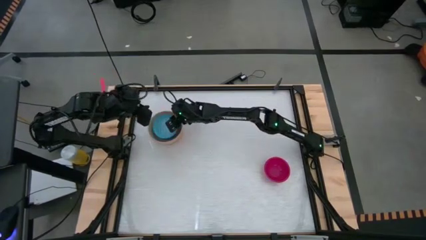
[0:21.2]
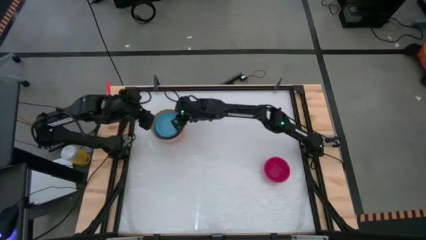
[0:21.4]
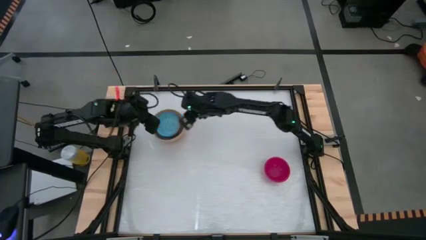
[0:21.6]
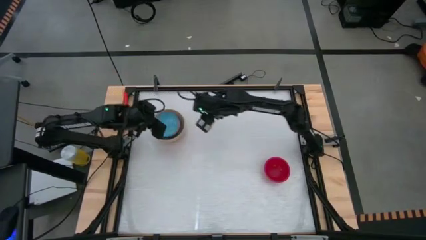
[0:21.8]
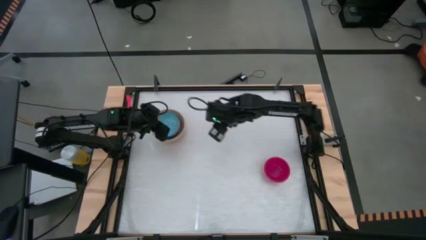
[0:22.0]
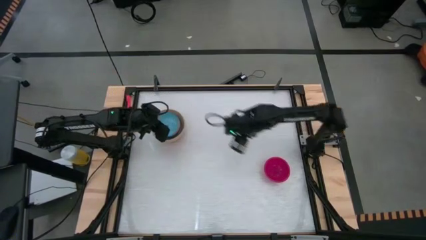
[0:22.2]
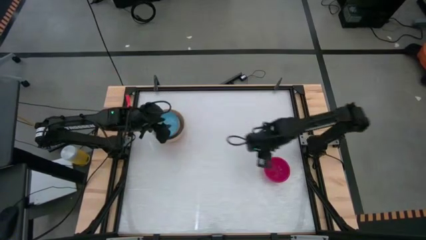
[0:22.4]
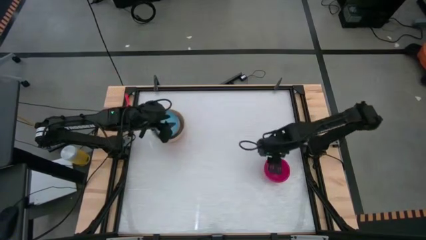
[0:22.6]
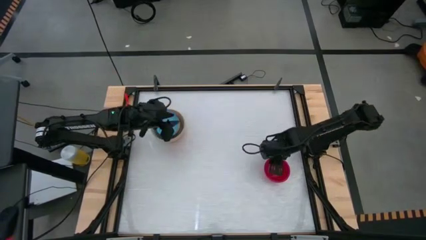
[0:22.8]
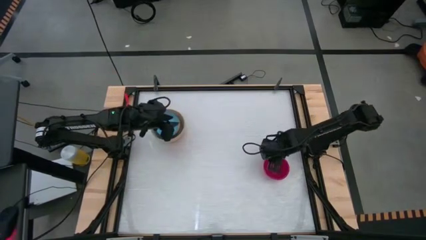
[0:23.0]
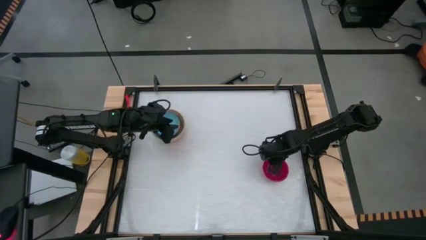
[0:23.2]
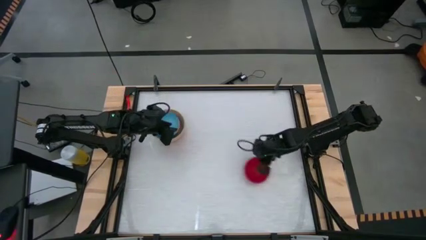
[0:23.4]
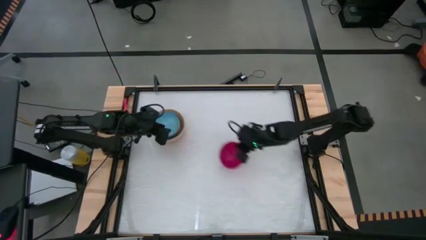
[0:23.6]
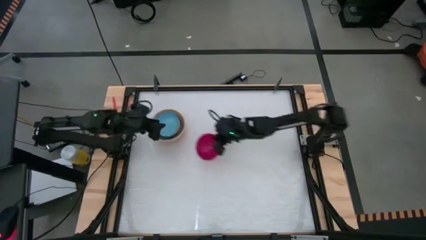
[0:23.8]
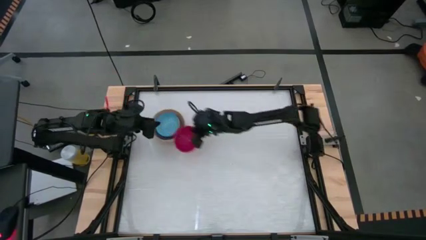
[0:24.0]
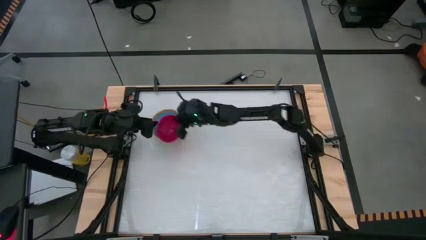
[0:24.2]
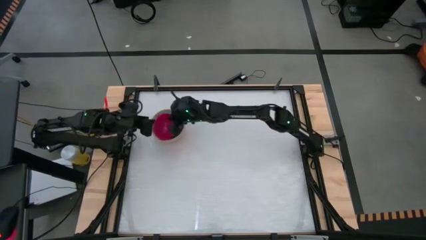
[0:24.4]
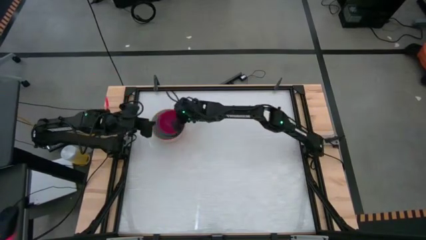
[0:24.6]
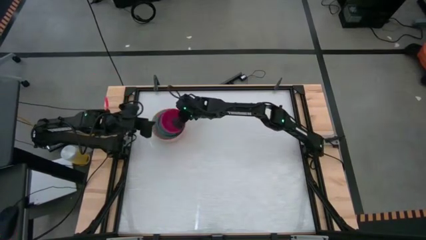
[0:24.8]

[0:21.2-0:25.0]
Stack the red bowl into the blue patterned bowl

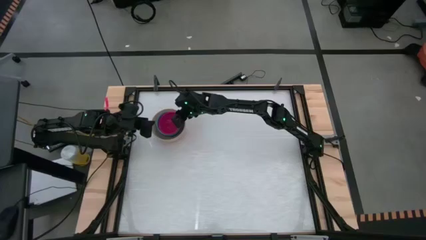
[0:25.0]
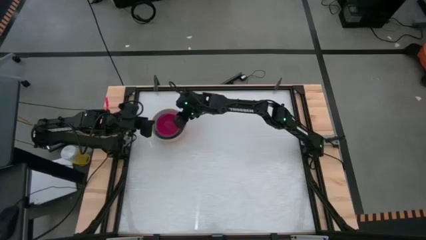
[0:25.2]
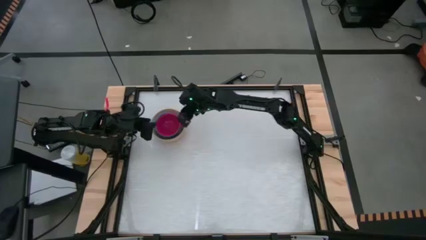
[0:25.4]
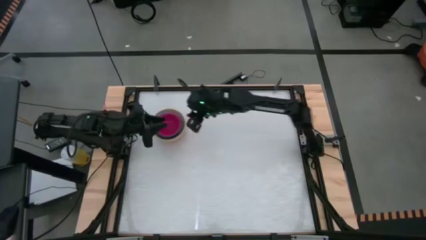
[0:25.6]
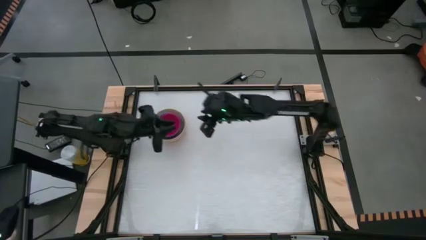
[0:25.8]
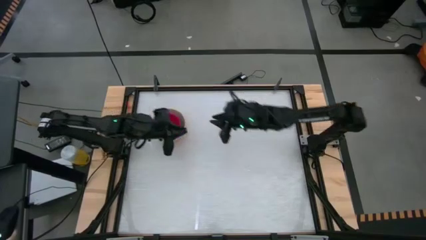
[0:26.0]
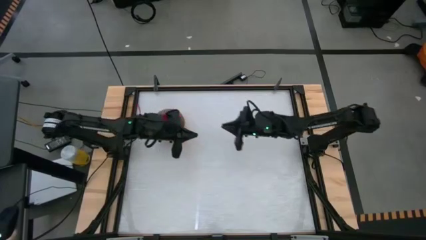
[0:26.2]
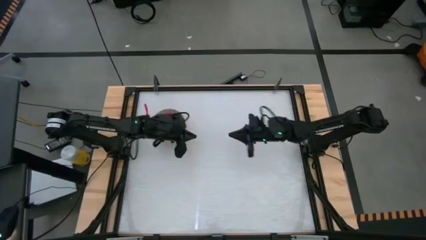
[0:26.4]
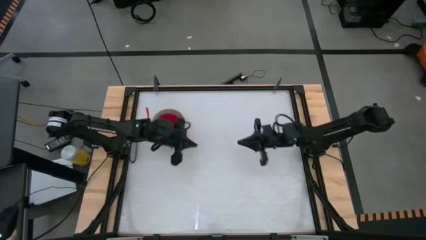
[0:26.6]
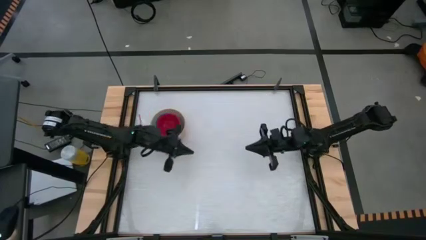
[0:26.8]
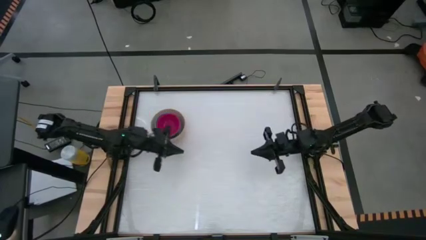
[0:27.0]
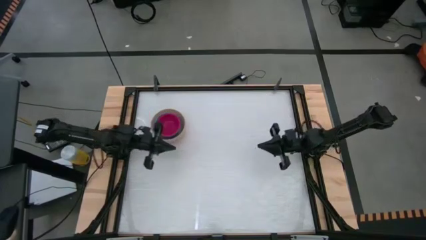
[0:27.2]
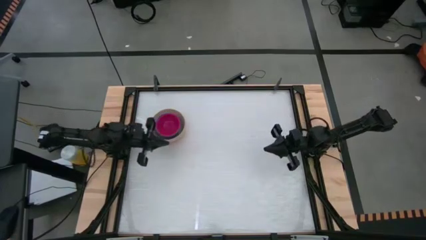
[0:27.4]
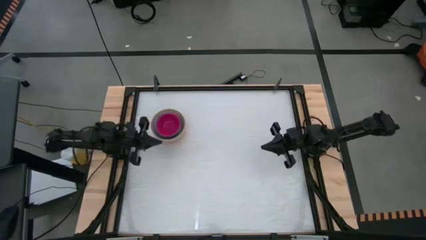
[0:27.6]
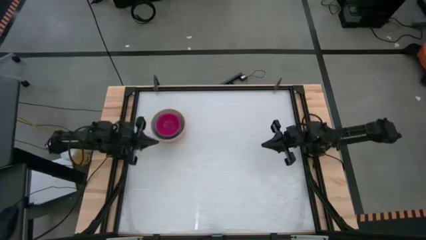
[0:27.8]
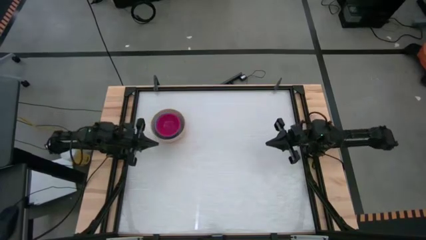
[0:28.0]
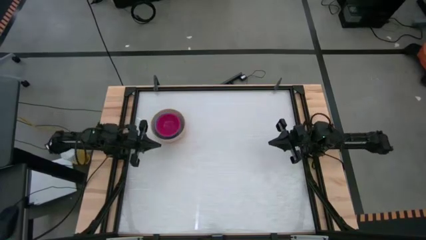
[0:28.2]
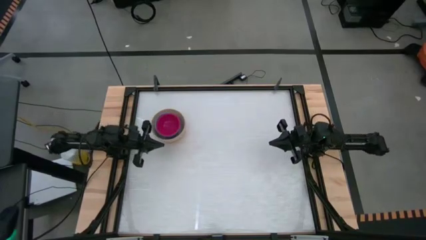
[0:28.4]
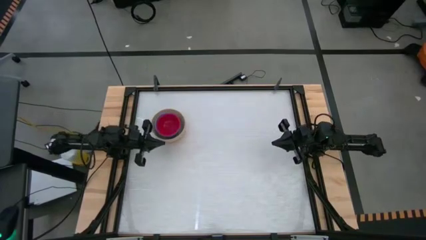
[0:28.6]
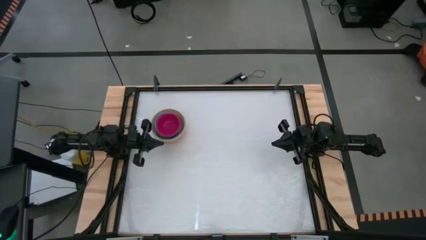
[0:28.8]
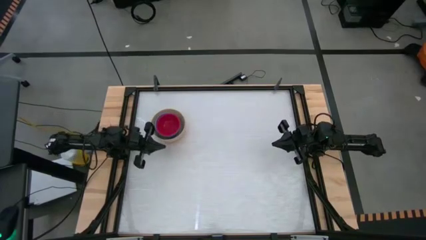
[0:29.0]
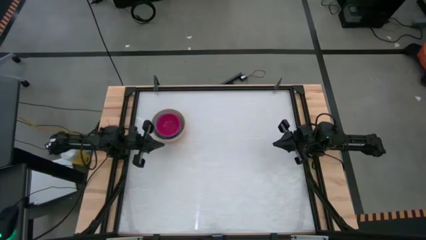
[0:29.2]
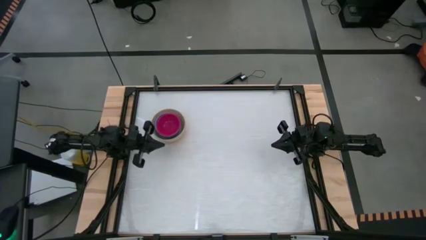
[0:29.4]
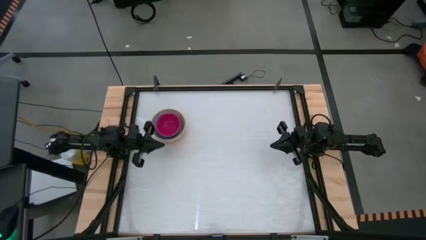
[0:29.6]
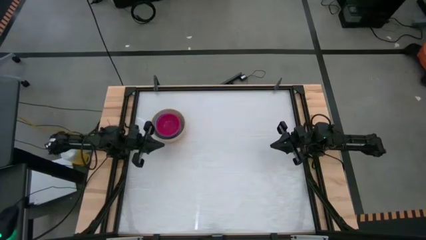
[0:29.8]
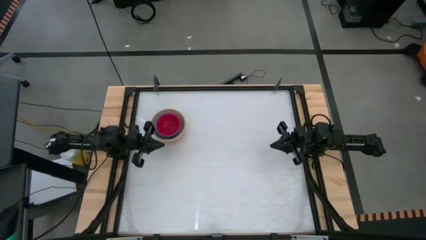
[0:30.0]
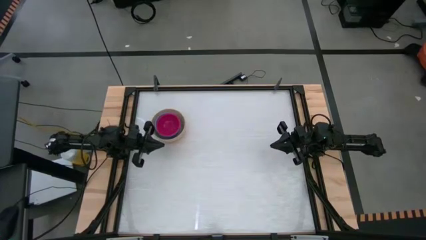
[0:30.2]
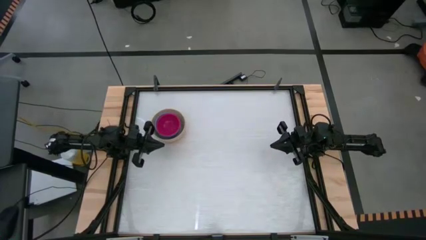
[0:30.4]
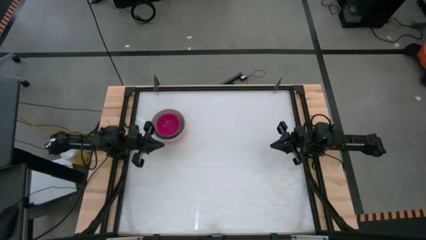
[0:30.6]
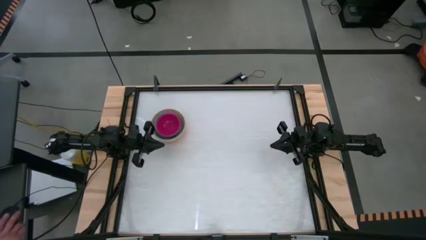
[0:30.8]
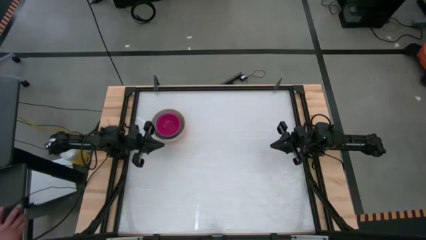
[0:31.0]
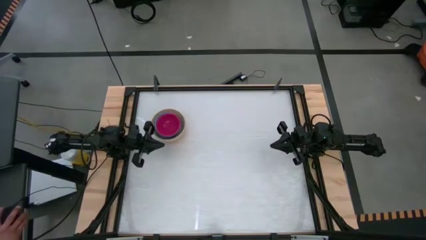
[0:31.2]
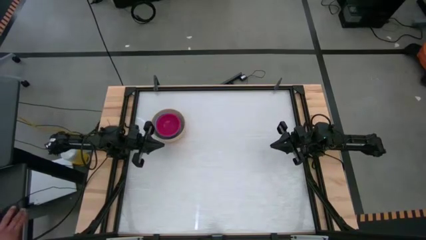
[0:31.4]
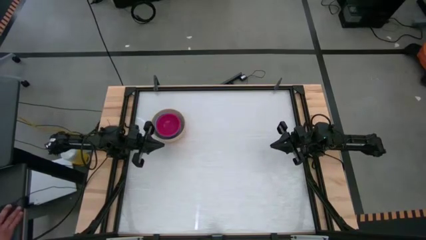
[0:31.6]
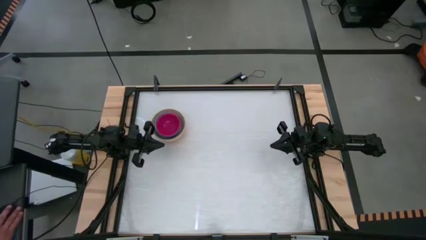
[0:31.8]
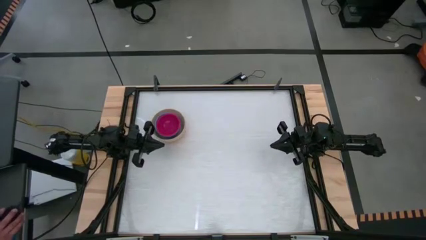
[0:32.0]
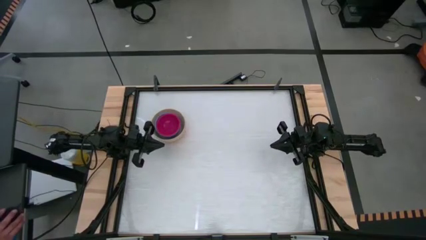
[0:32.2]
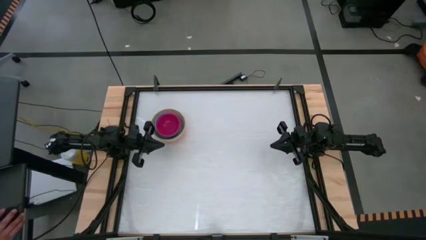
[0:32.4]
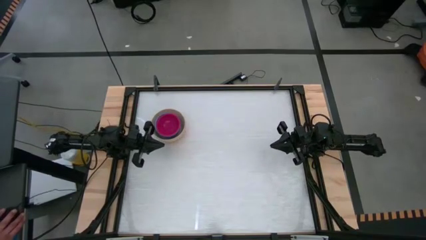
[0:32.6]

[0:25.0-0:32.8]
Return to Home Position

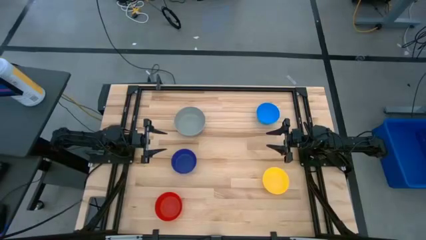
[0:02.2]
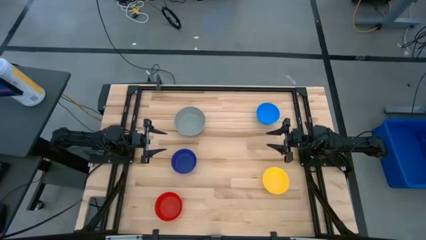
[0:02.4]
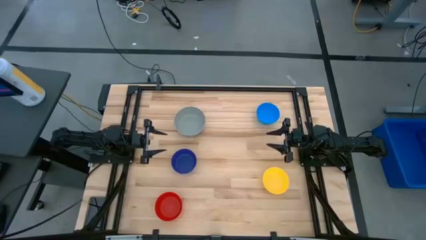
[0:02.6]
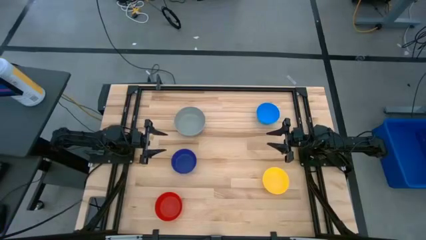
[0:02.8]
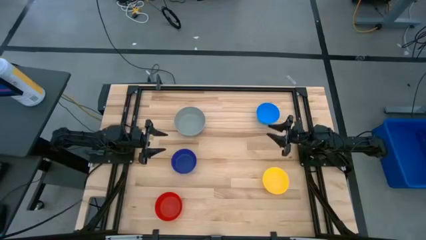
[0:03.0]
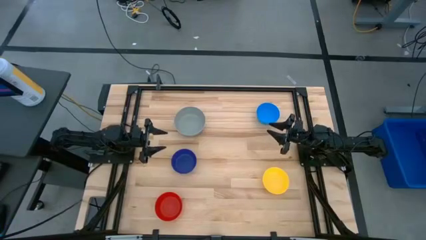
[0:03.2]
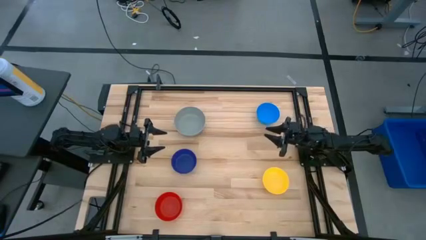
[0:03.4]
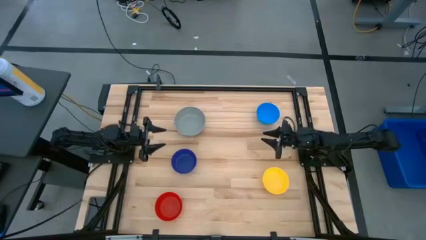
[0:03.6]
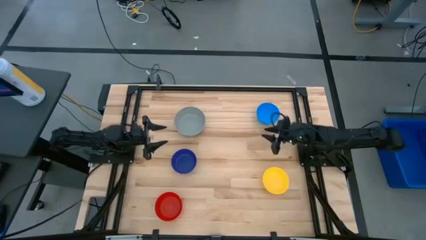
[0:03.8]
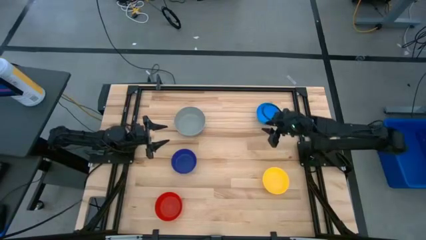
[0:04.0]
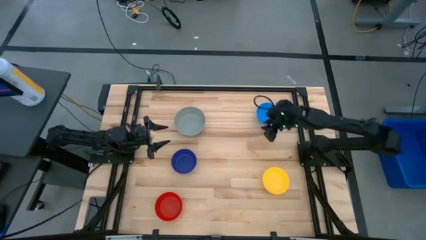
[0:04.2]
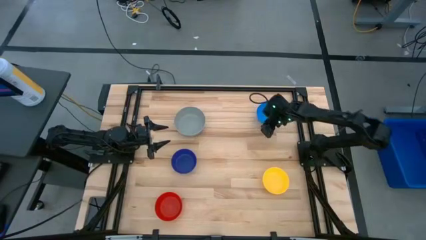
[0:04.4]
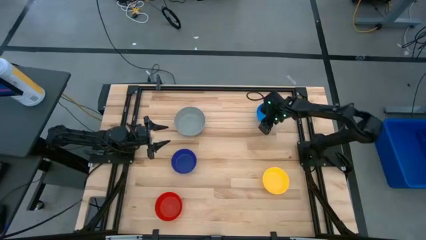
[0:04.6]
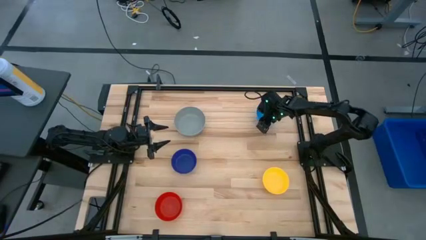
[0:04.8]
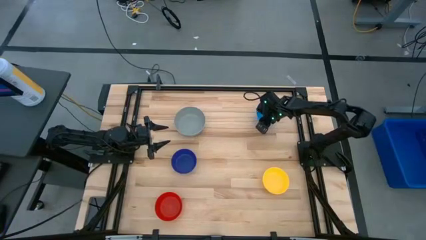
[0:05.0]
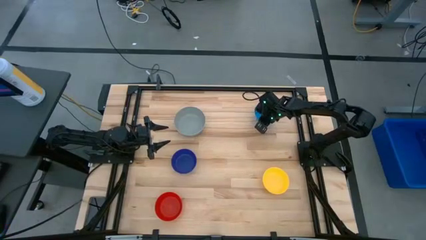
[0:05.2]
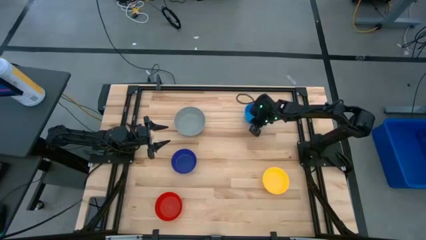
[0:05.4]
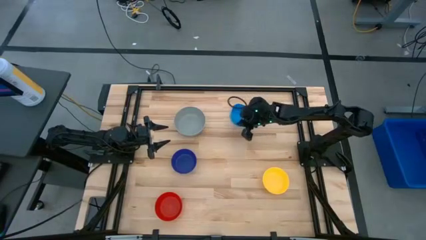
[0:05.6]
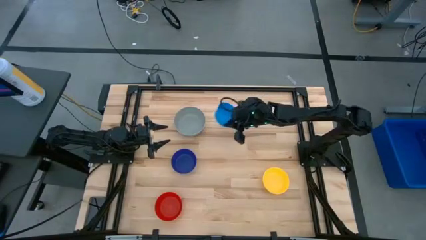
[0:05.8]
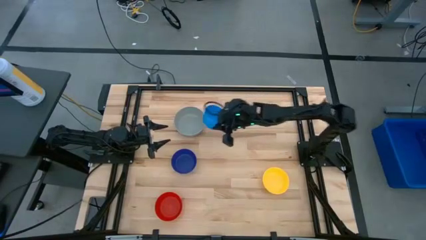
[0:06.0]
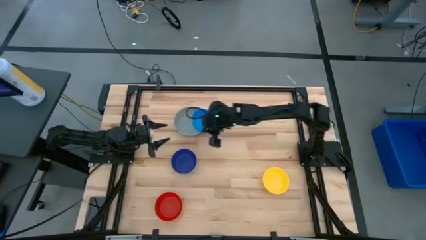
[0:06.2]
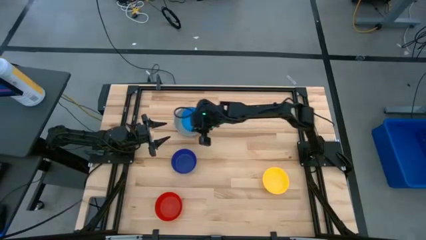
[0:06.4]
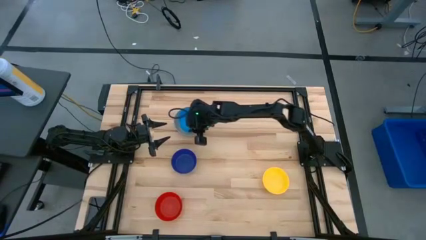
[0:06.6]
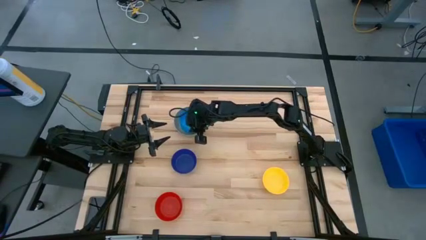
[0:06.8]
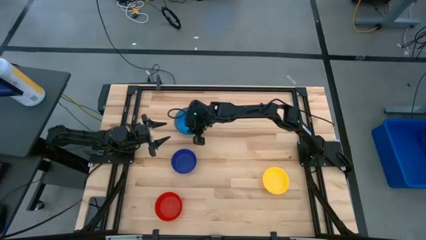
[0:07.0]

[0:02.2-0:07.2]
Stack the light blue bowl on the gray bowl
